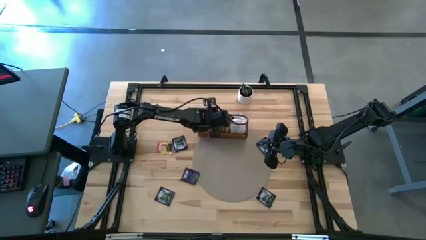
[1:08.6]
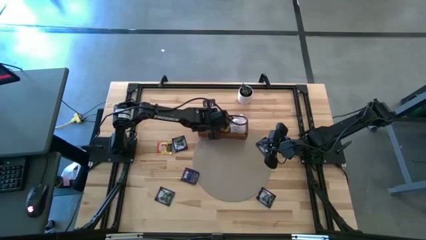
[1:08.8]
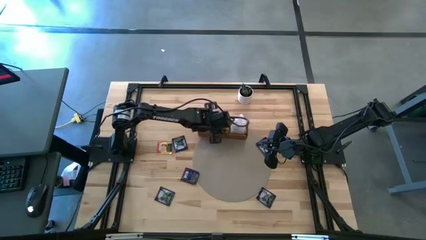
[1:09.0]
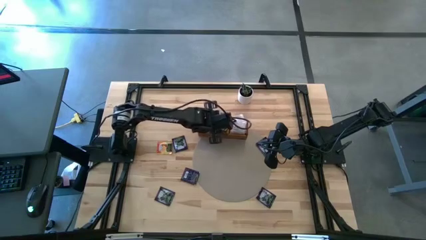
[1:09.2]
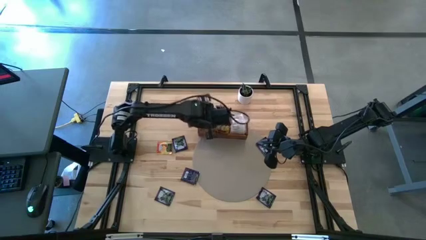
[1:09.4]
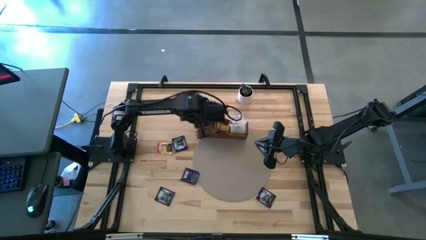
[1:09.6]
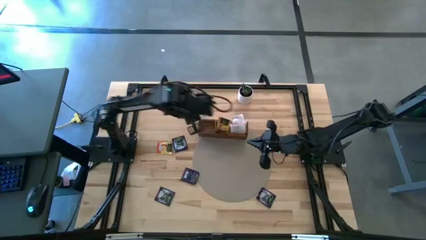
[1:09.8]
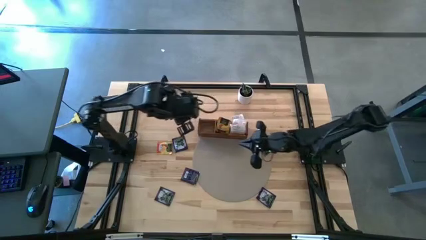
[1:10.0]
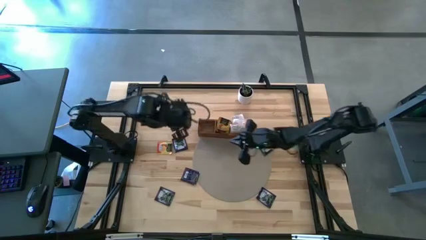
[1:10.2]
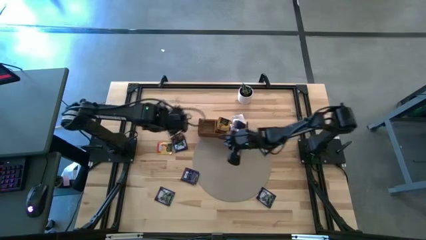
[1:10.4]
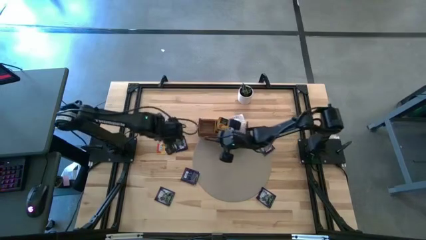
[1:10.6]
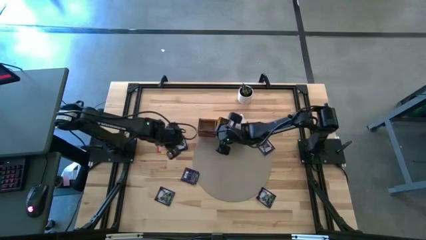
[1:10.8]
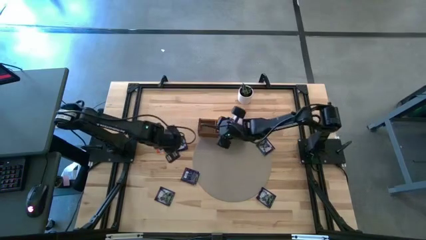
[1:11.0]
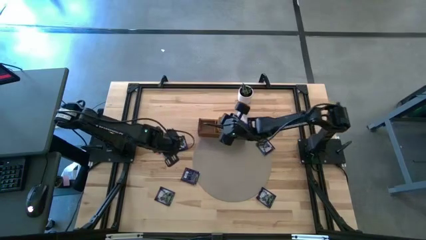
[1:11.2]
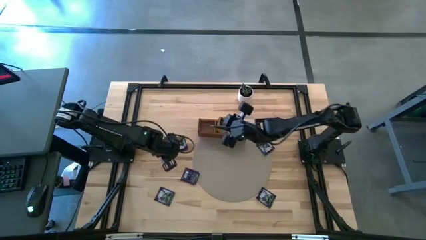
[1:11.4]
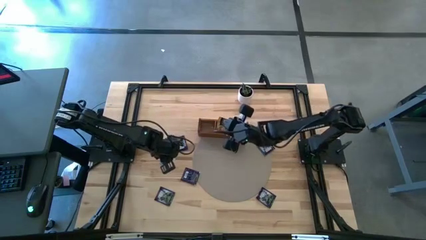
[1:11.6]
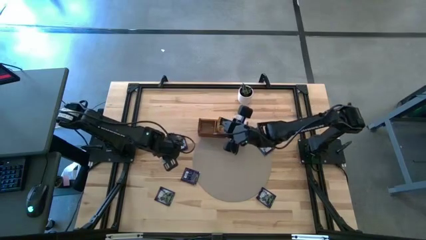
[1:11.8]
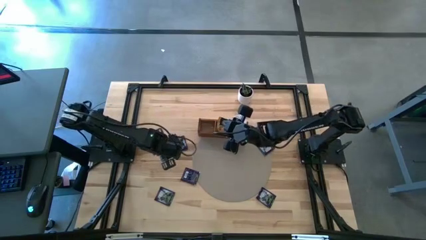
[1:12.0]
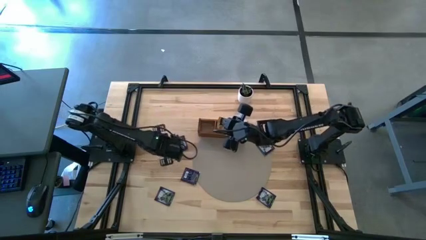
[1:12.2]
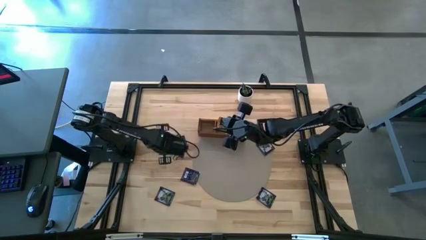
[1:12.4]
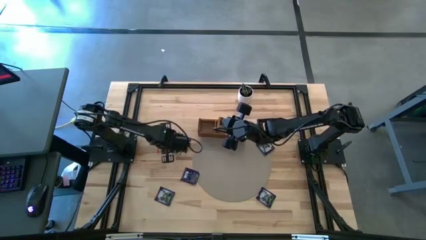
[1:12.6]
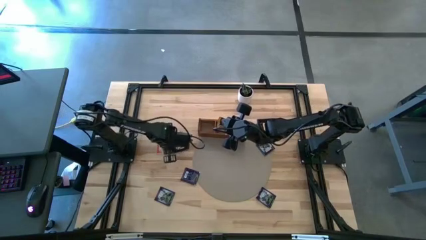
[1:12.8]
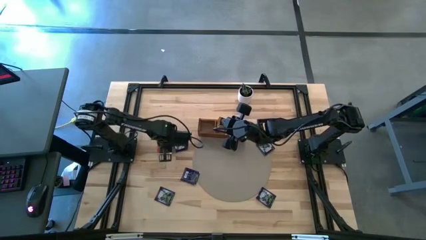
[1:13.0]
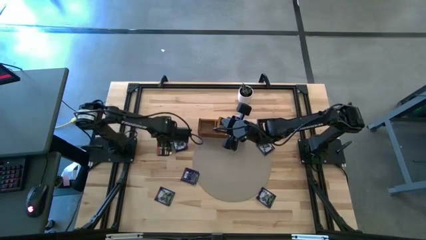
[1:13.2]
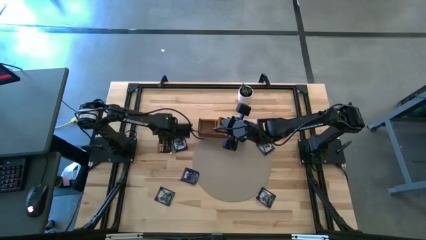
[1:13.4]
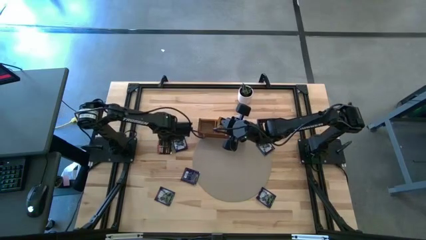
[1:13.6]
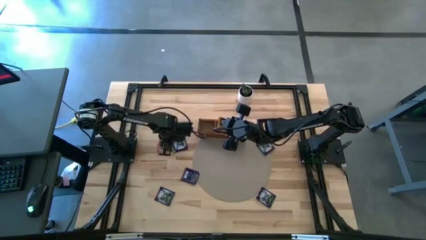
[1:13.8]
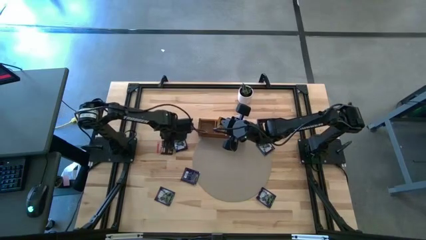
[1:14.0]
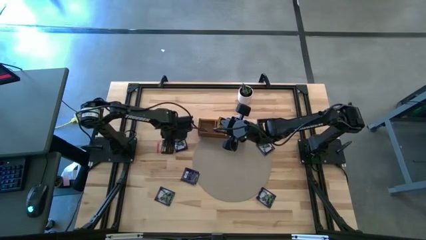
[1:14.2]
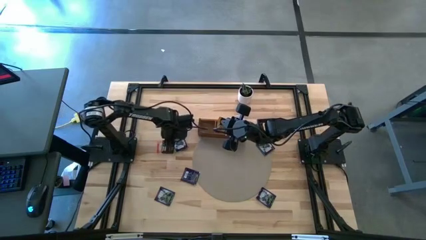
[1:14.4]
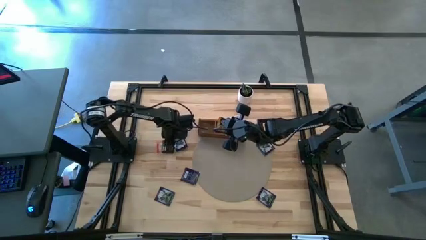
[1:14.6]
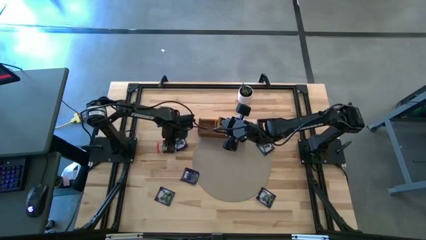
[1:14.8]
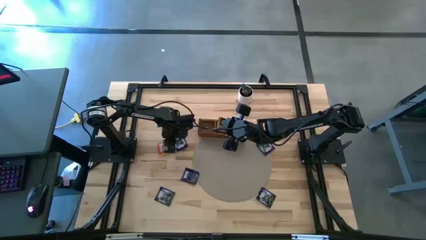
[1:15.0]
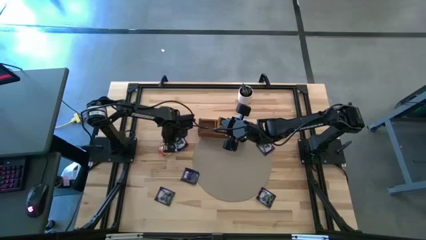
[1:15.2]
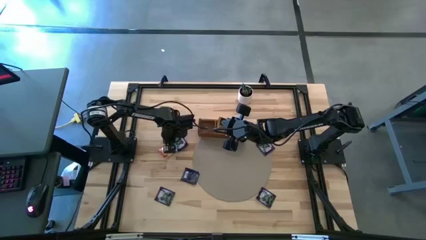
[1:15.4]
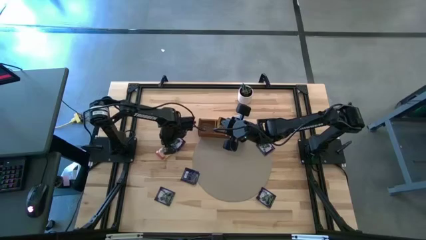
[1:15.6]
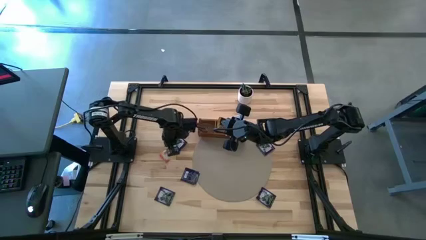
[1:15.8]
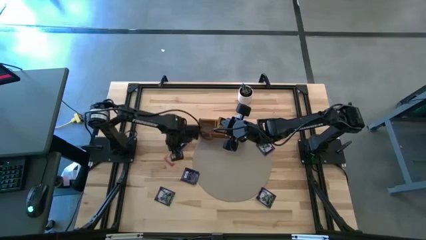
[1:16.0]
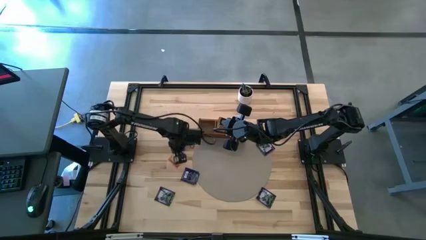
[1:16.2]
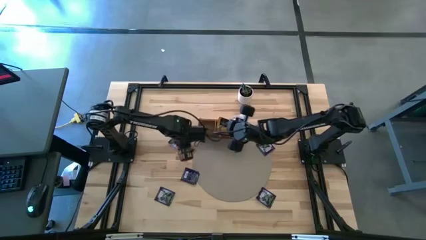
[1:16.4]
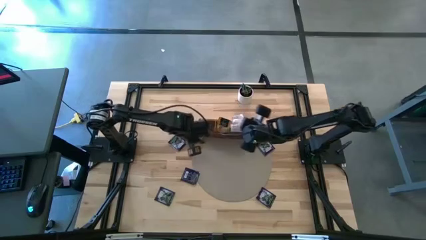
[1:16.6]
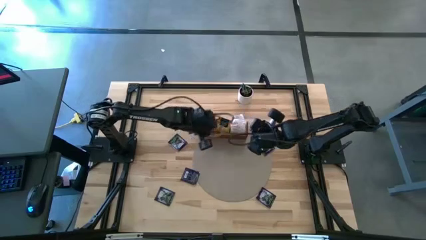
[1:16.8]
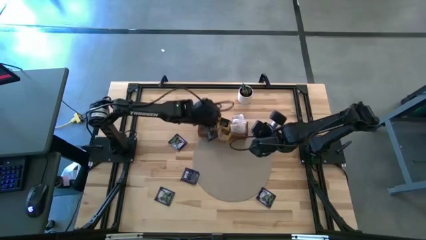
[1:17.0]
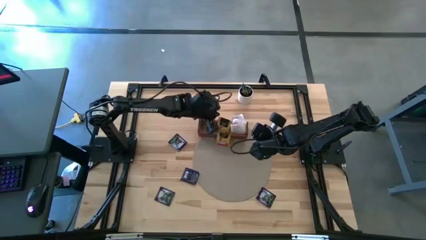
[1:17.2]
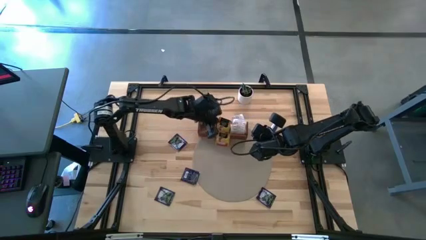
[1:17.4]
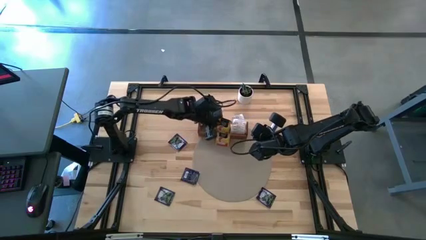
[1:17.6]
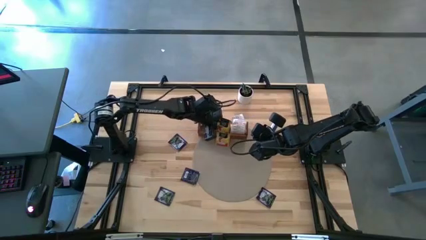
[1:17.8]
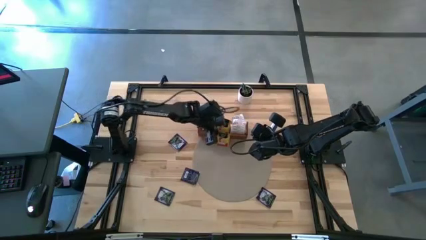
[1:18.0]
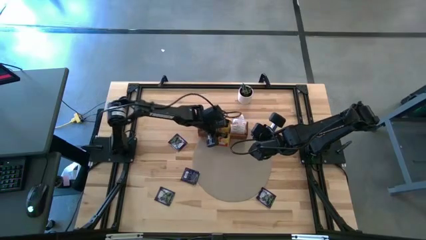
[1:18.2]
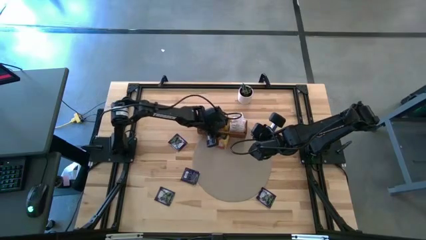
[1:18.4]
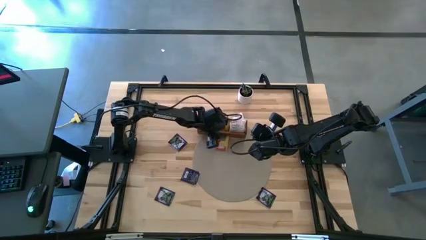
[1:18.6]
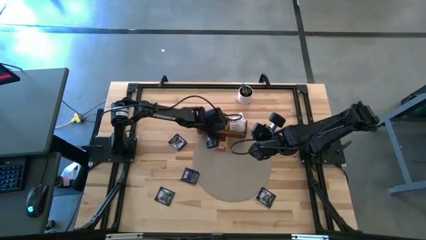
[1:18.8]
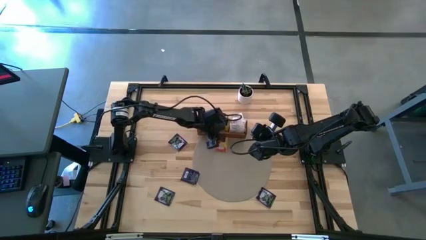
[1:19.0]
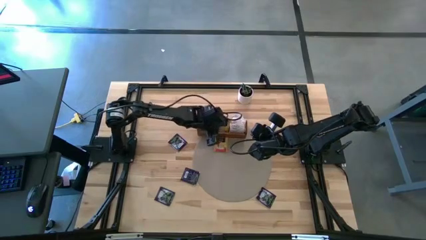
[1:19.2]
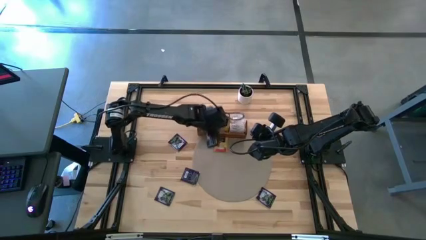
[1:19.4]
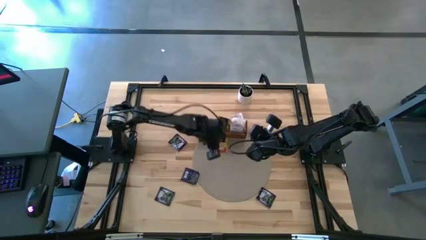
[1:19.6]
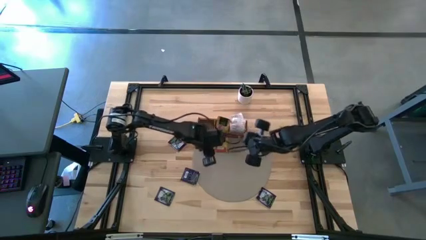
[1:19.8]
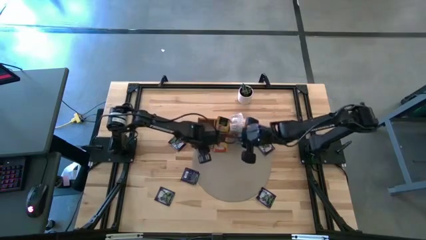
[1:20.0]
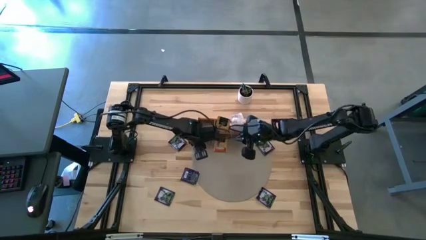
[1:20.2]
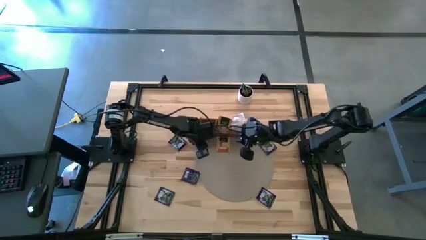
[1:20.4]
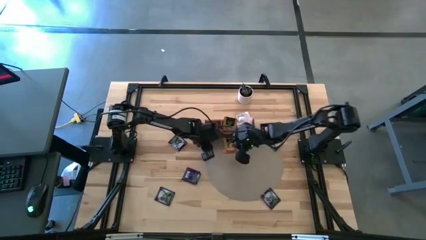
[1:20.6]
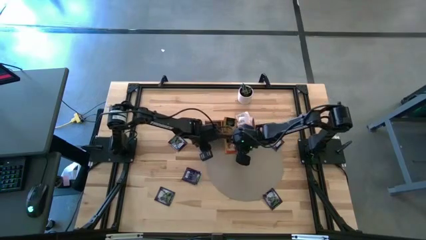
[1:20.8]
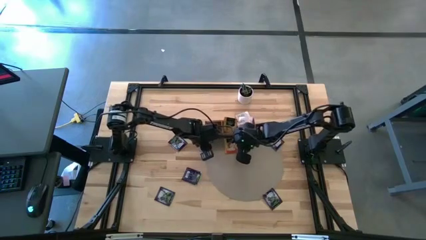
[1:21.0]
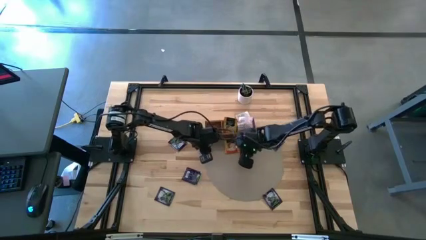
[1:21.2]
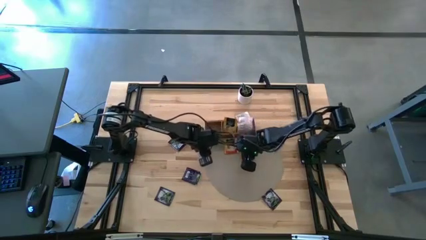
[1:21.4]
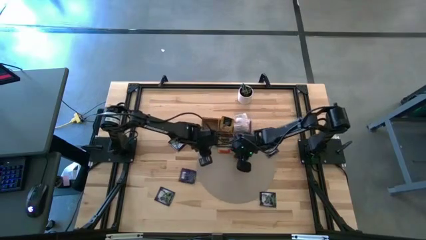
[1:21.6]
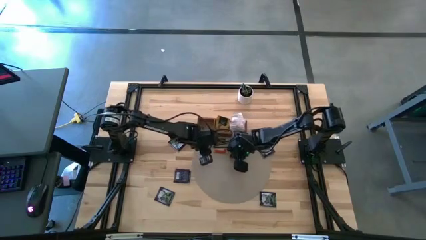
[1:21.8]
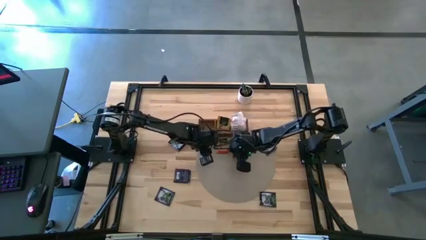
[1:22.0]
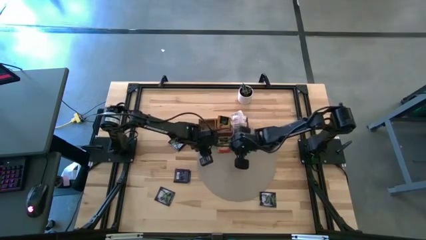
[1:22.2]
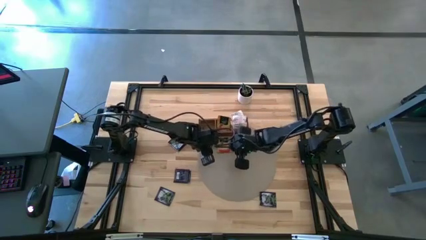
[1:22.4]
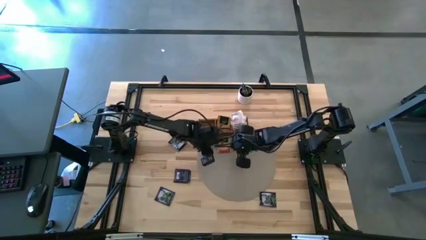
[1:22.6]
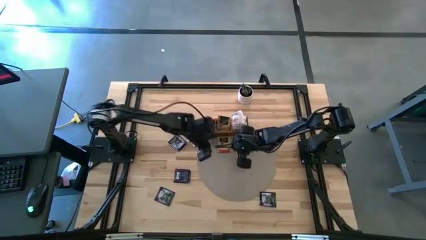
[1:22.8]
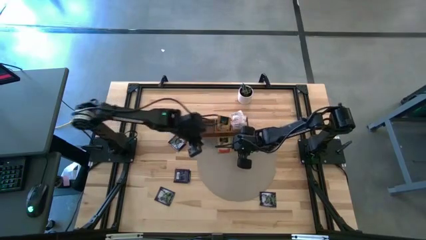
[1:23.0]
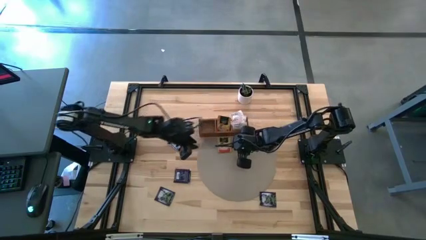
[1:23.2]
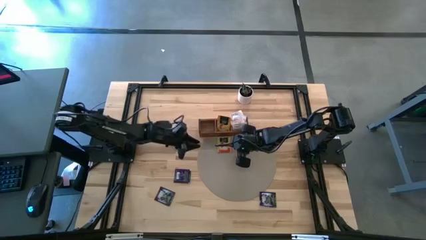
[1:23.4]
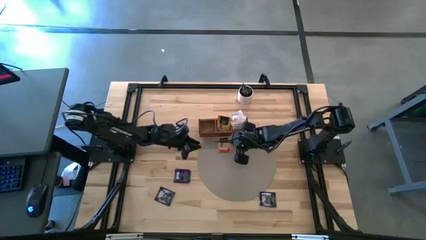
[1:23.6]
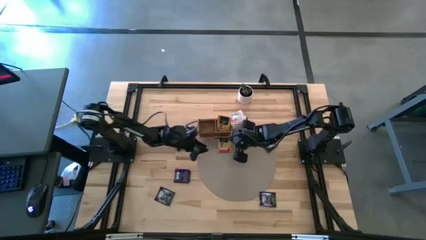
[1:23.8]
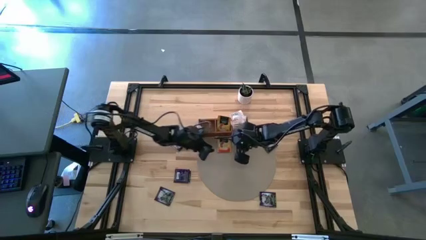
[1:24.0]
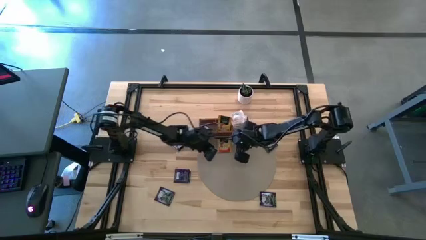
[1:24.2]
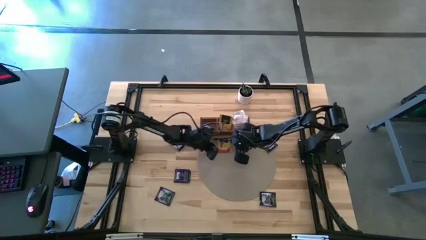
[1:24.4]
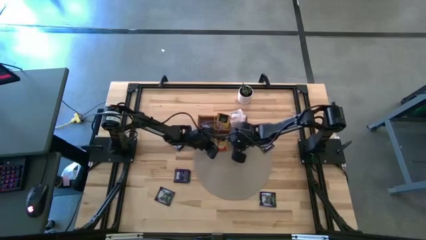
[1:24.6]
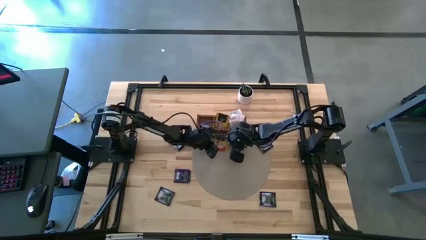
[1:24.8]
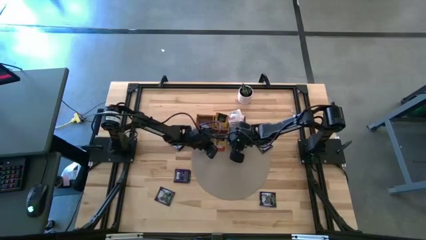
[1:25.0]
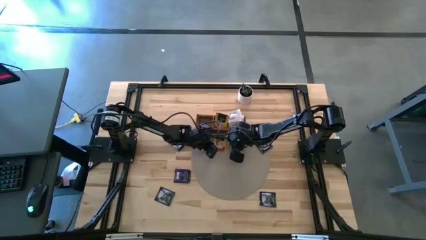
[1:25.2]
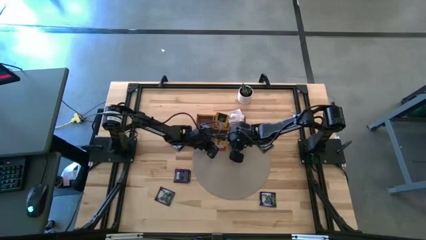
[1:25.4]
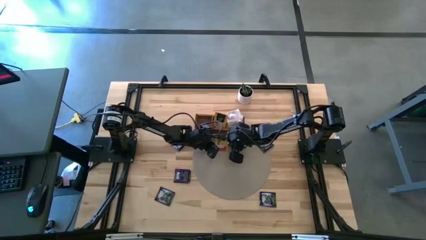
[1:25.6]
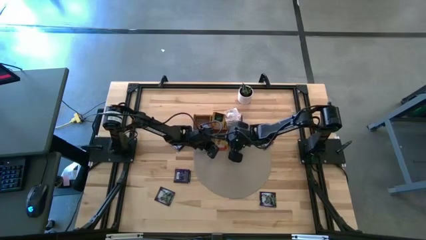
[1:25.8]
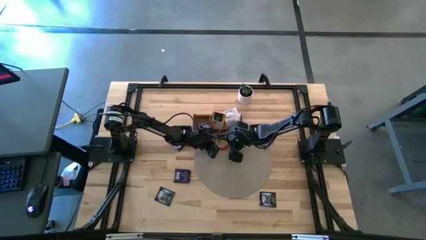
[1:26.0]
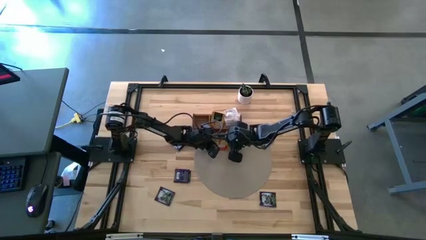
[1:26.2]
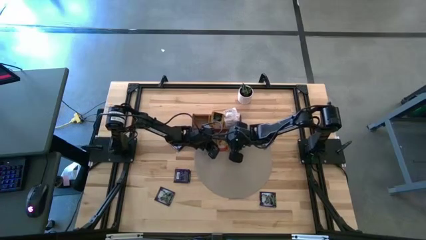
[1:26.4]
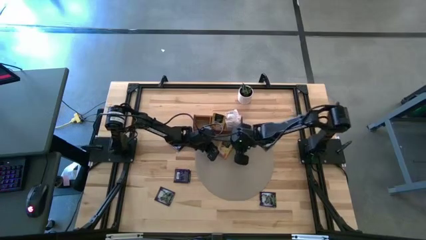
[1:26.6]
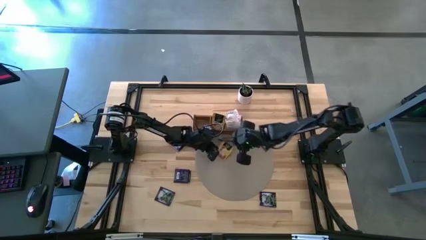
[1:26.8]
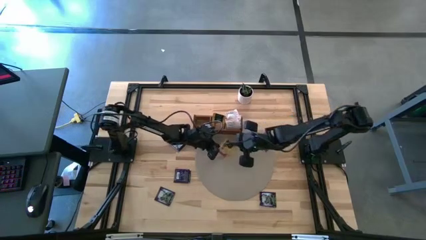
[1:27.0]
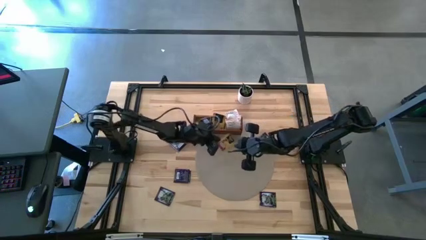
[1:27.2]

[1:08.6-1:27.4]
Task: Pick & Place Tea
Put the yellow tea bag into the middle section of the wooden organizer
